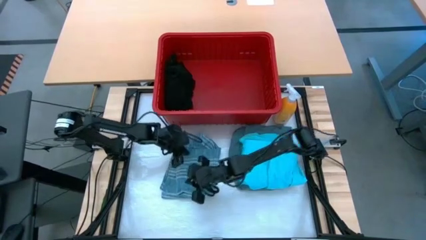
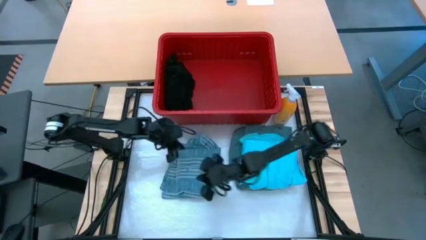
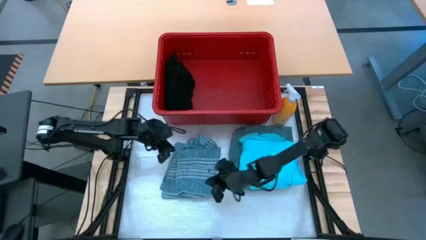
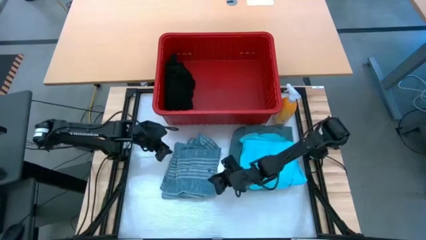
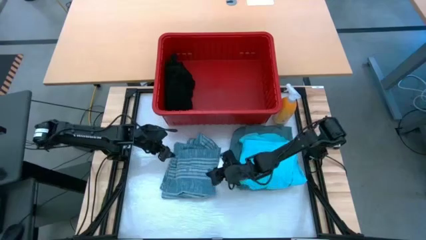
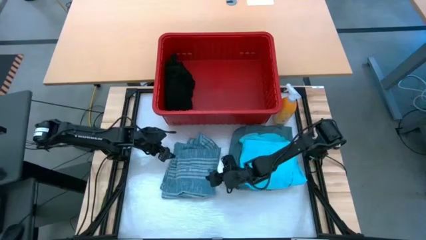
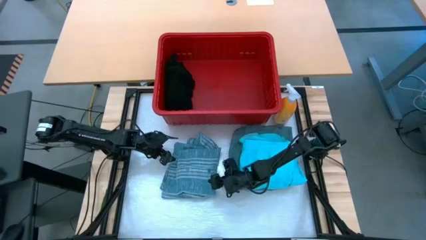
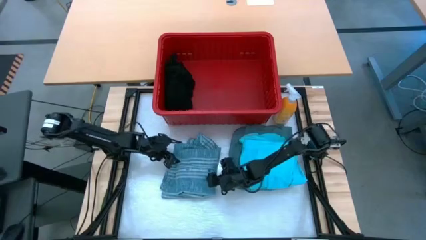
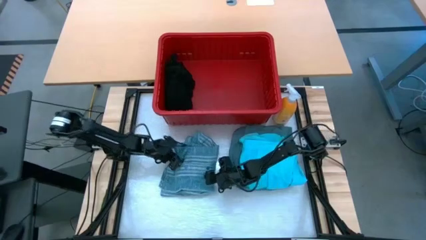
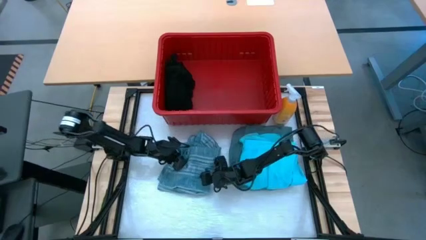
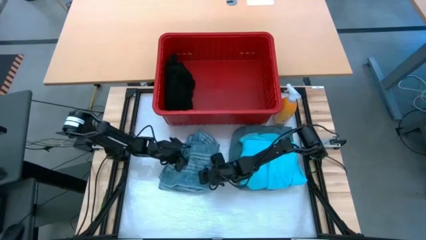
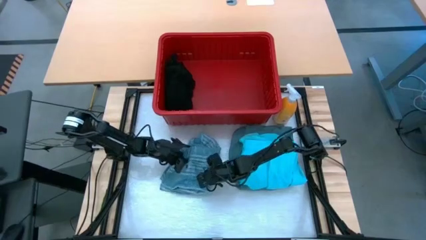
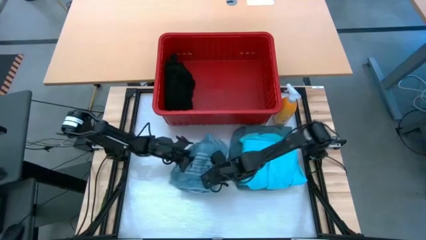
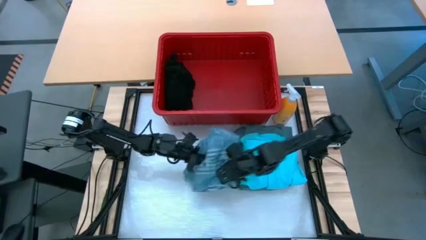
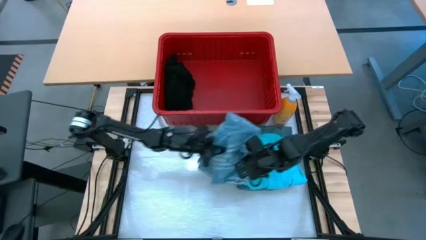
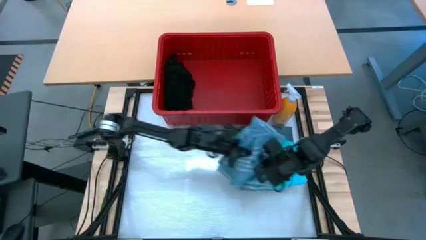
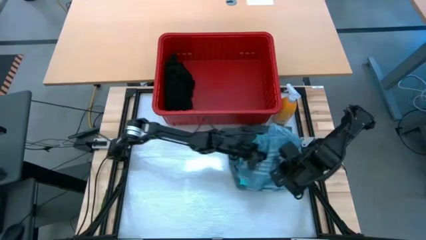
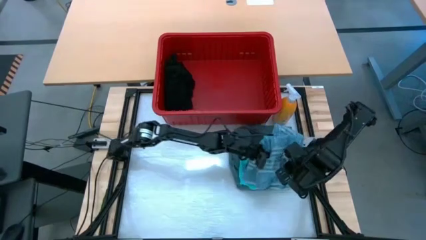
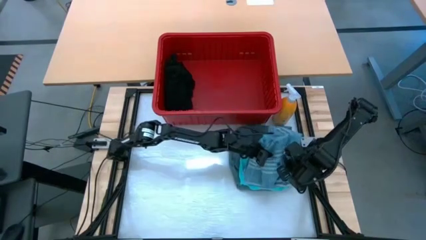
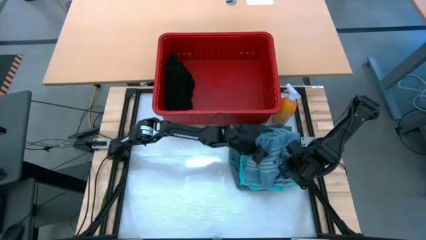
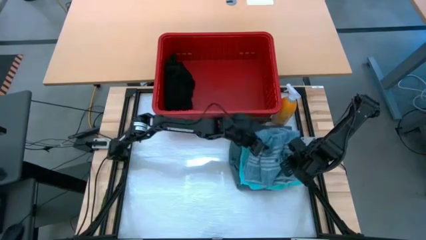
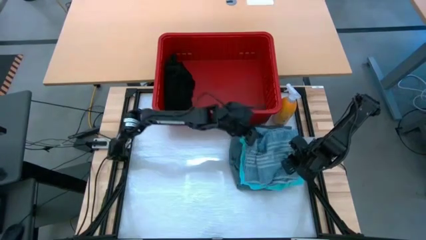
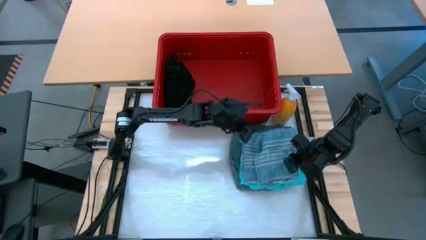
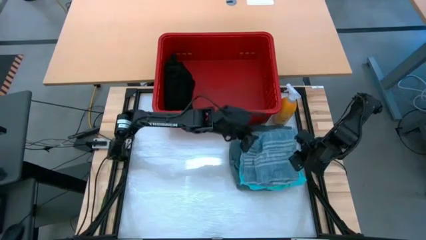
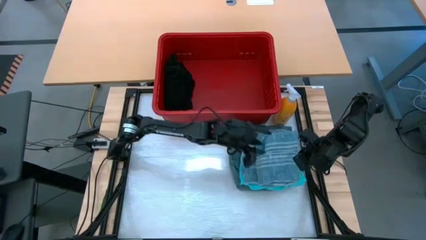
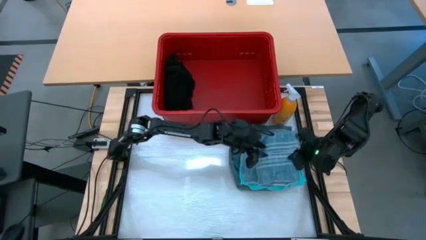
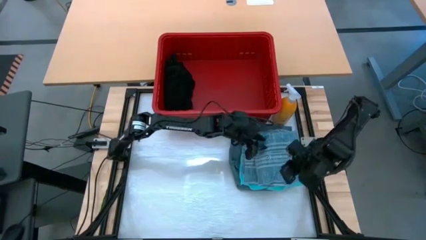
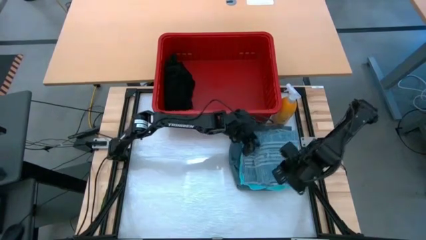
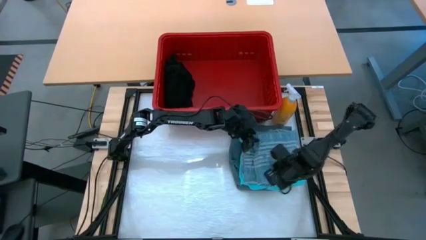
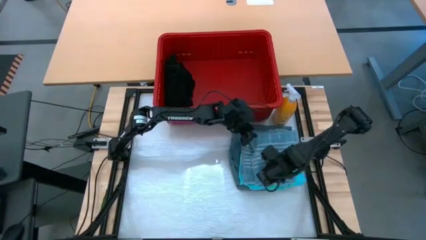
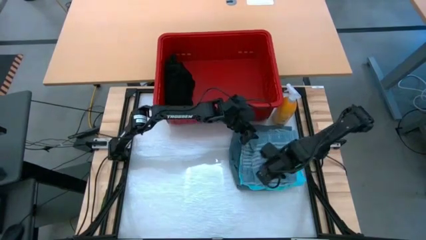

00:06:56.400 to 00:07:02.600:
Task: Fold Laundry from Bin
Stack the blue shirt on top of the sky blue shorts

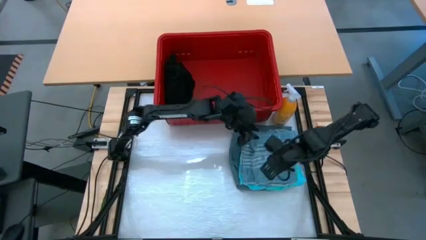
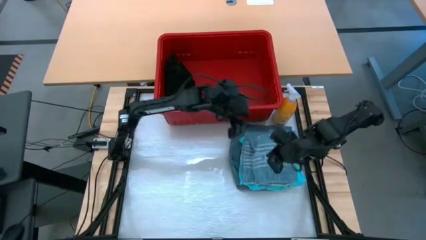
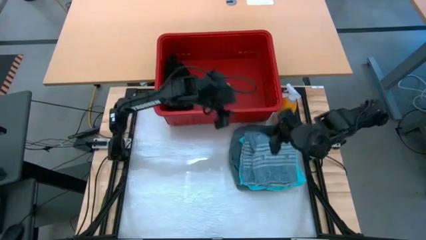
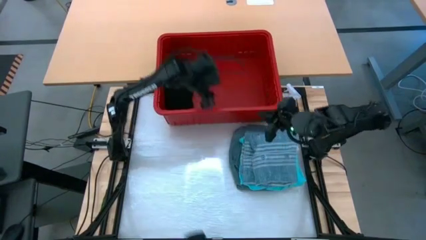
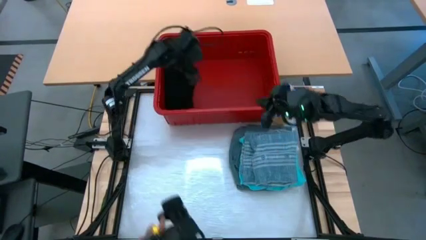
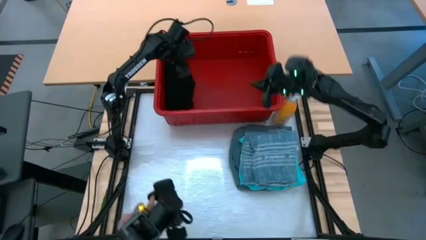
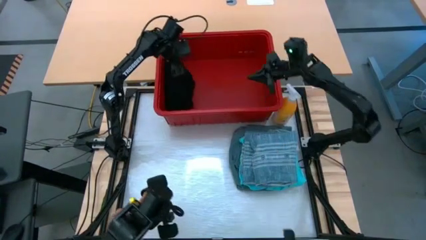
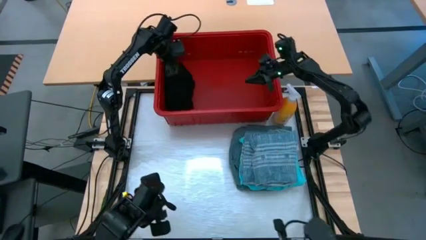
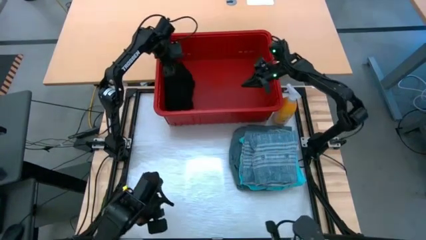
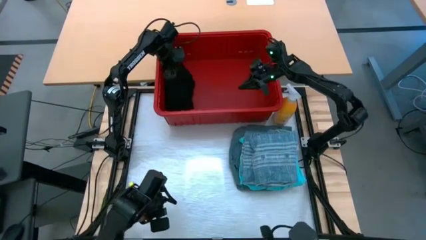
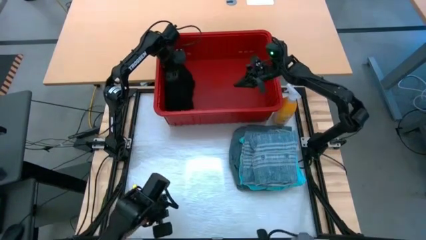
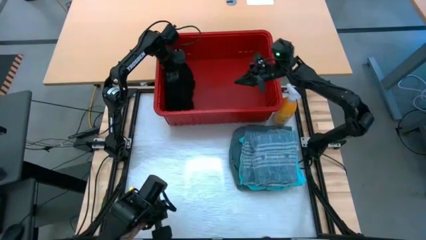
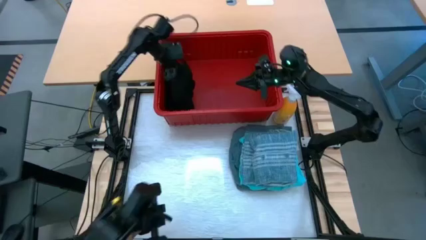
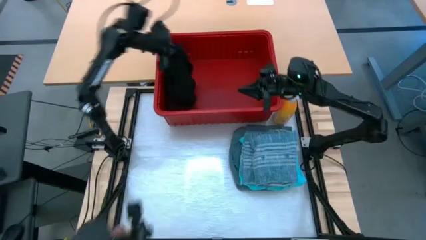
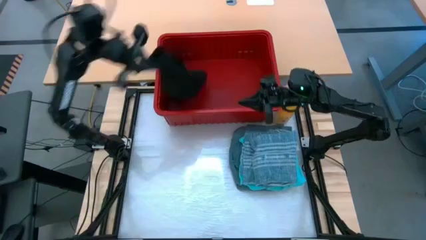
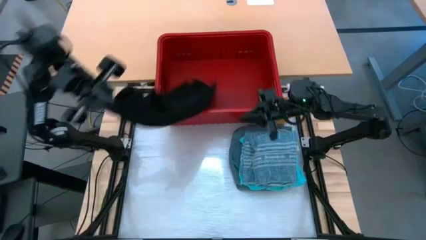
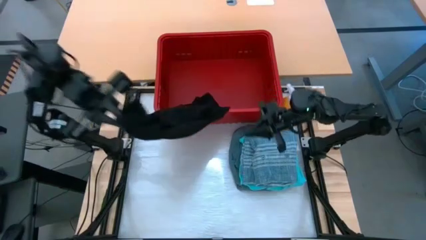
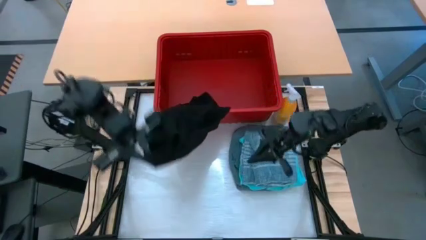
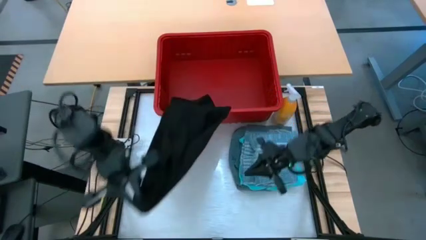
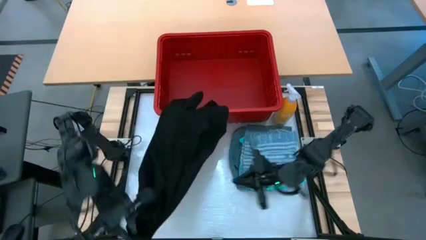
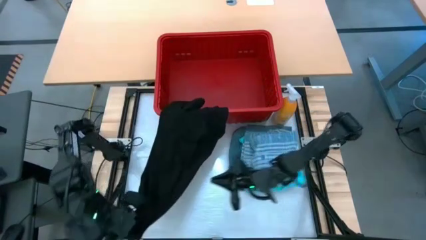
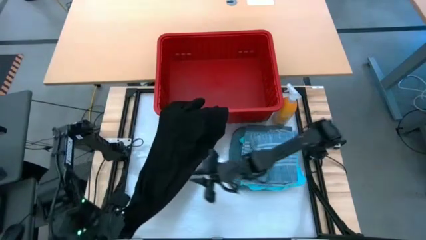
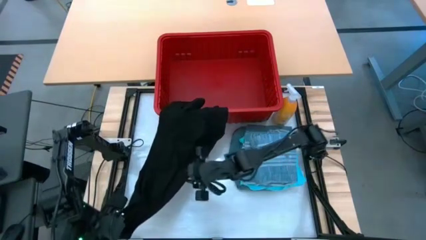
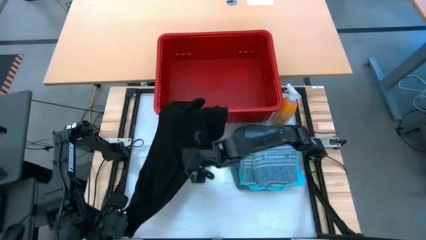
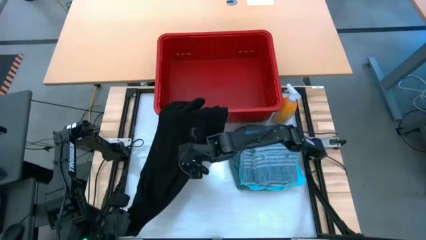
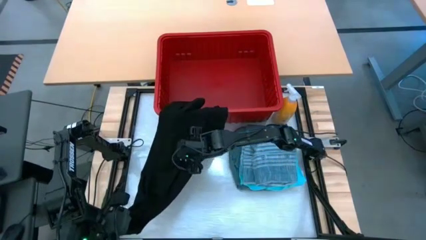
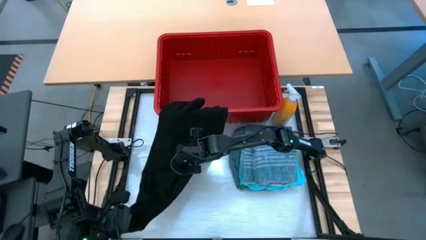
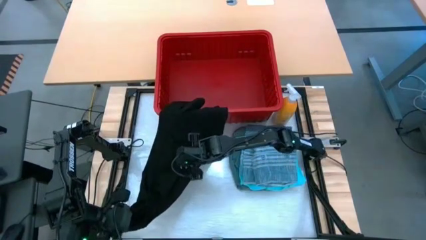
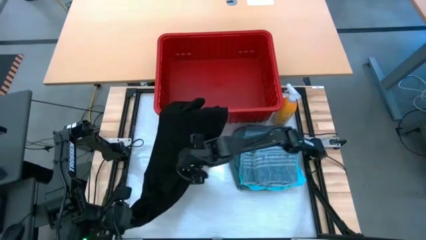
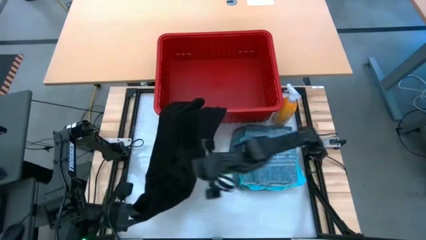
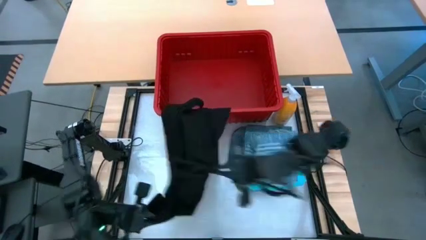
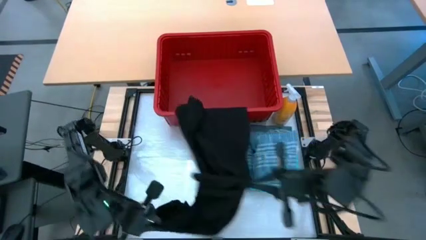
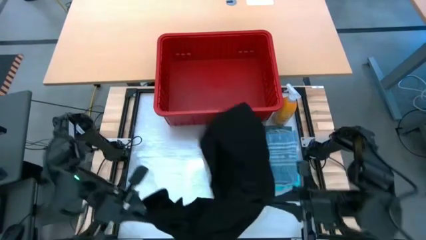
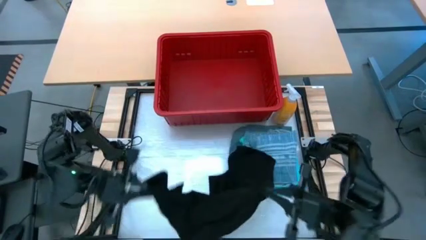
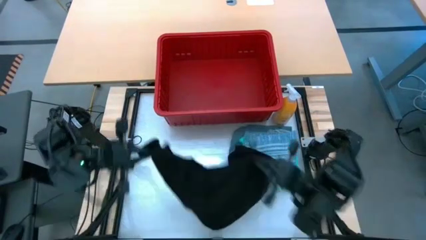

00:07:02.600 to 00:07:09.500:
Remove the black shirt from the red laundry bin
